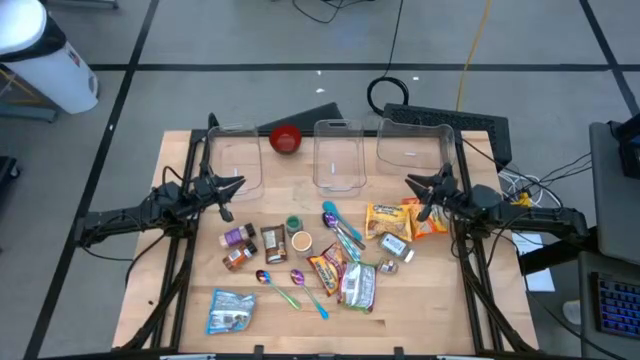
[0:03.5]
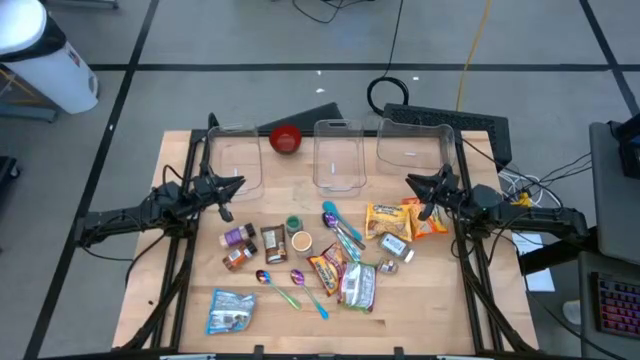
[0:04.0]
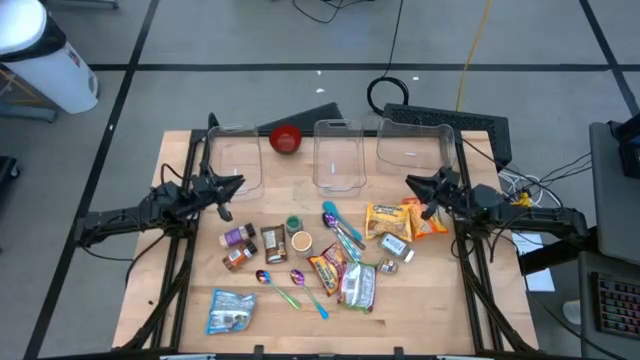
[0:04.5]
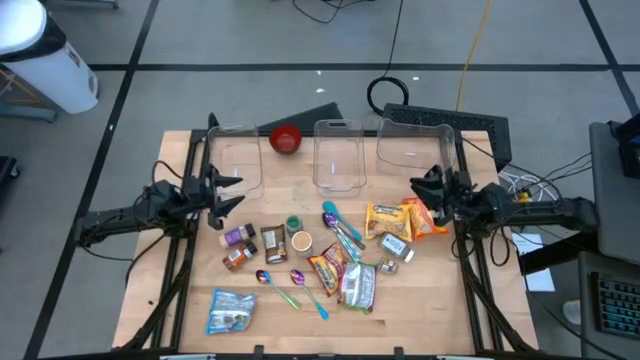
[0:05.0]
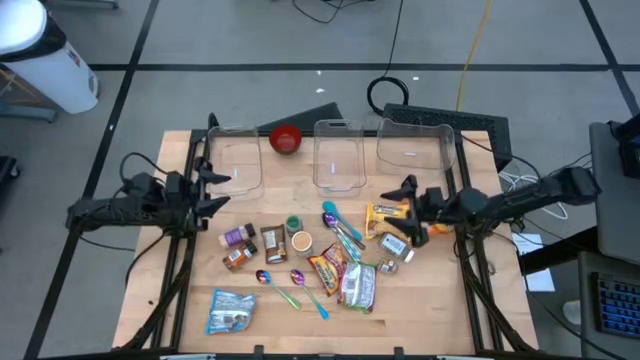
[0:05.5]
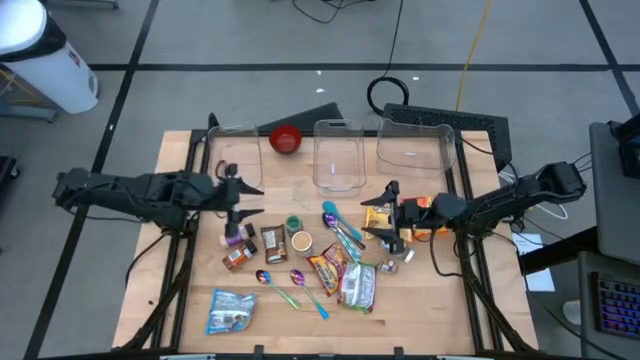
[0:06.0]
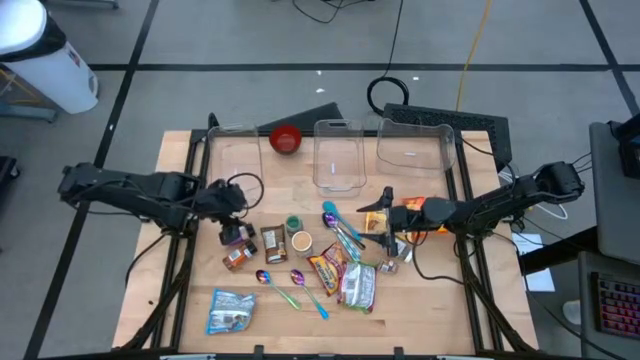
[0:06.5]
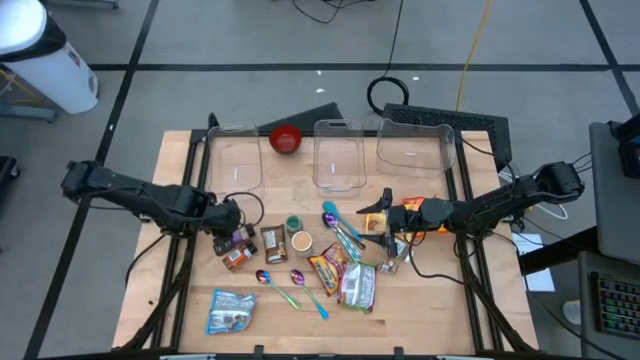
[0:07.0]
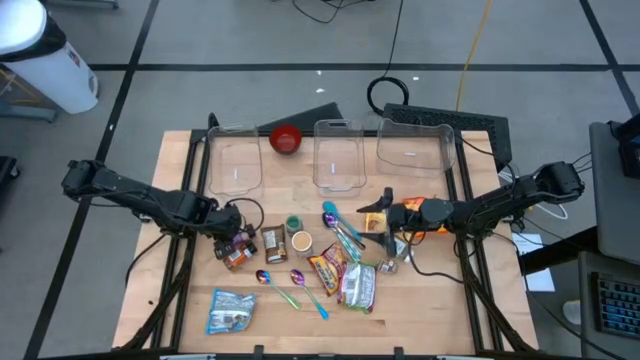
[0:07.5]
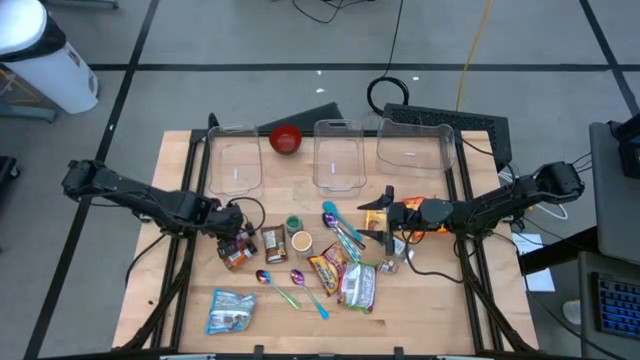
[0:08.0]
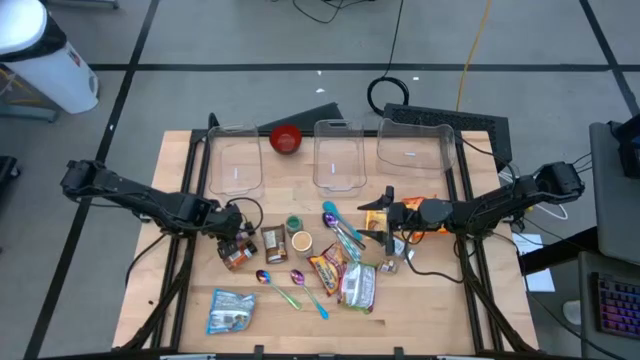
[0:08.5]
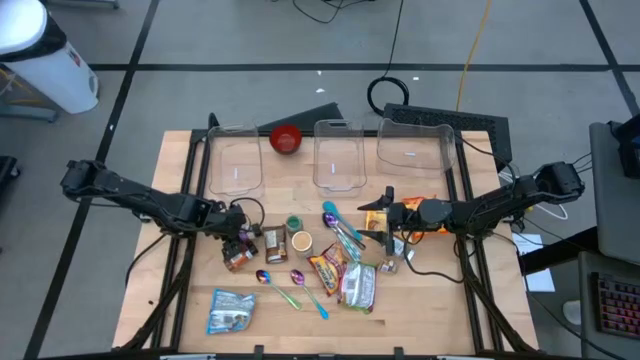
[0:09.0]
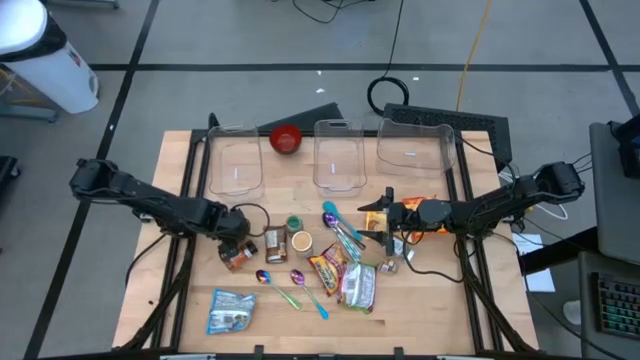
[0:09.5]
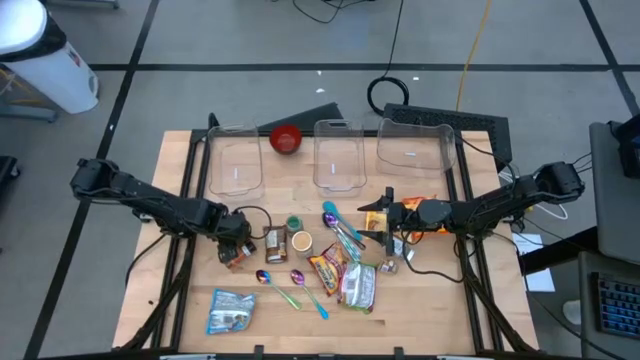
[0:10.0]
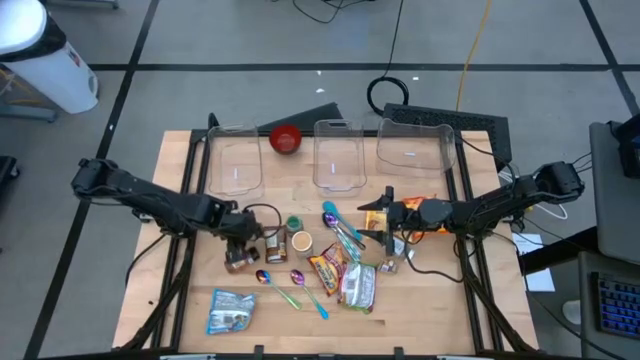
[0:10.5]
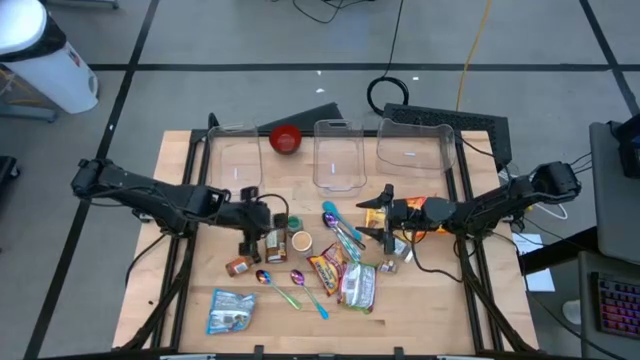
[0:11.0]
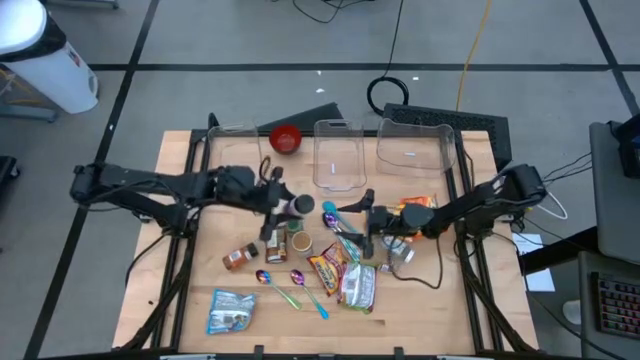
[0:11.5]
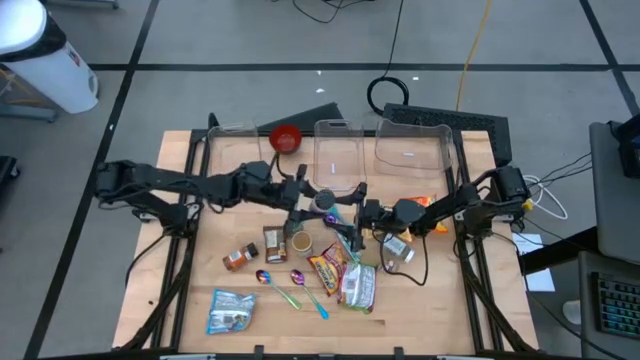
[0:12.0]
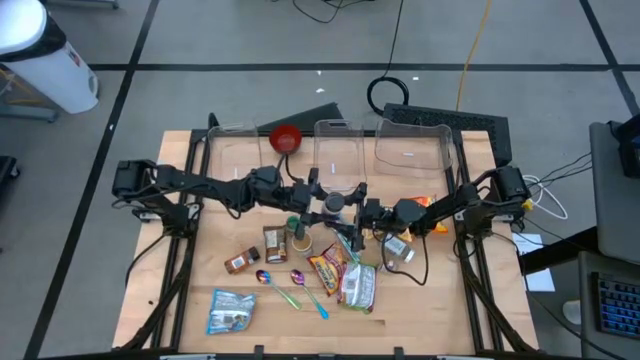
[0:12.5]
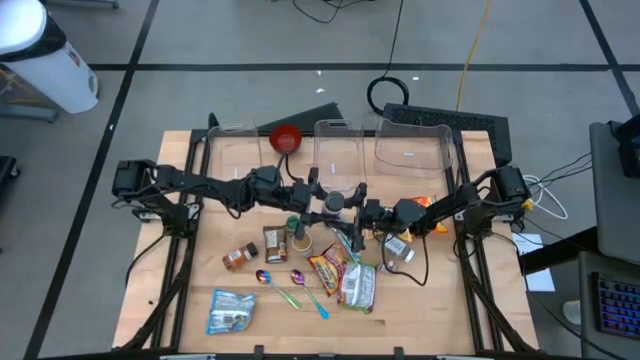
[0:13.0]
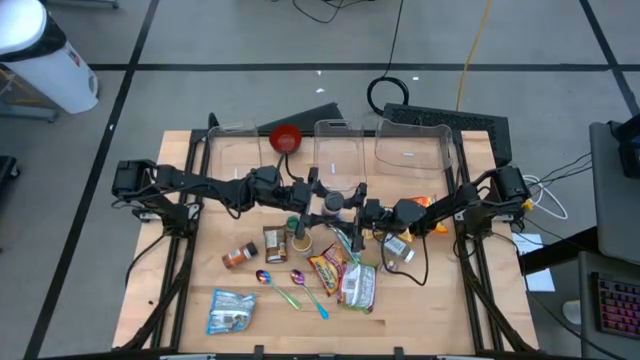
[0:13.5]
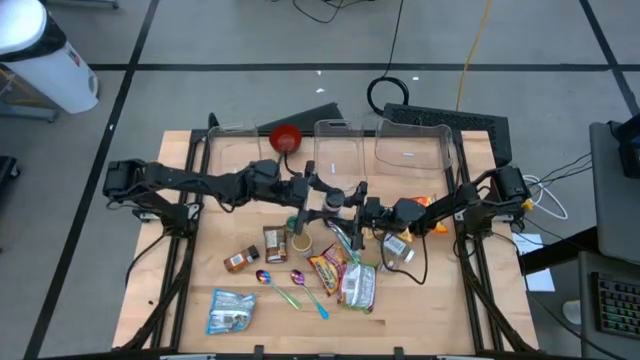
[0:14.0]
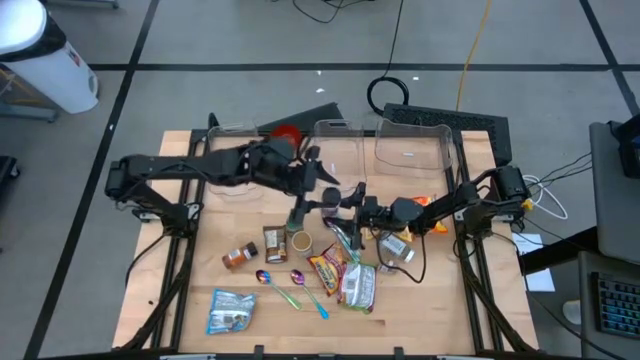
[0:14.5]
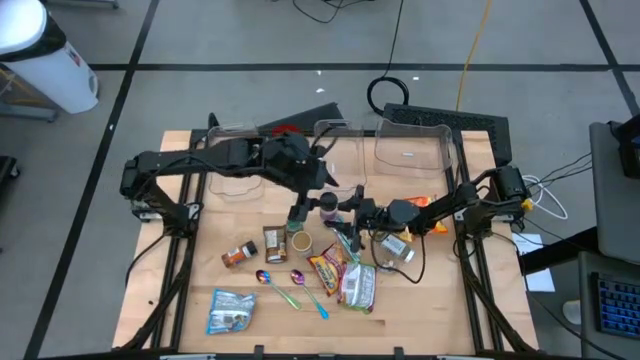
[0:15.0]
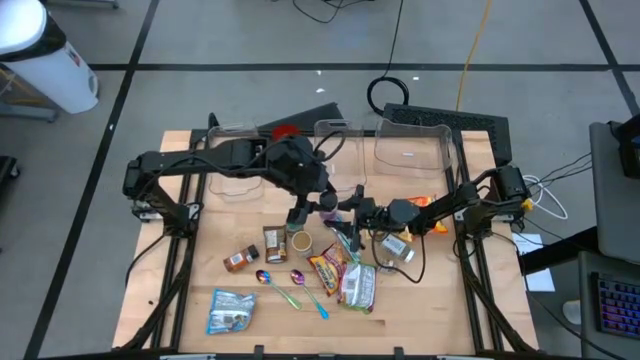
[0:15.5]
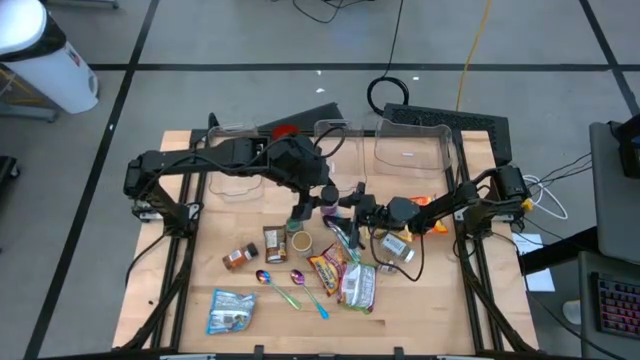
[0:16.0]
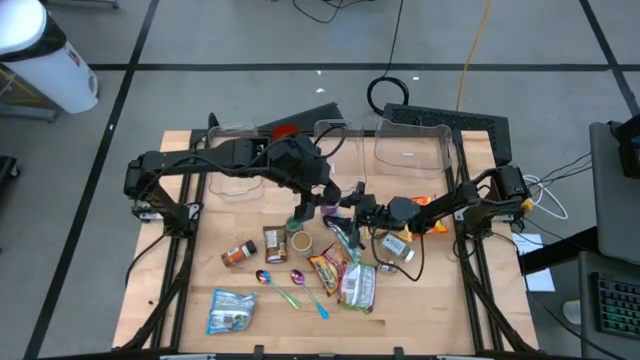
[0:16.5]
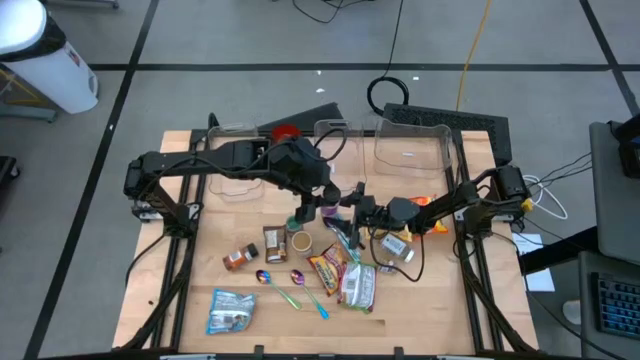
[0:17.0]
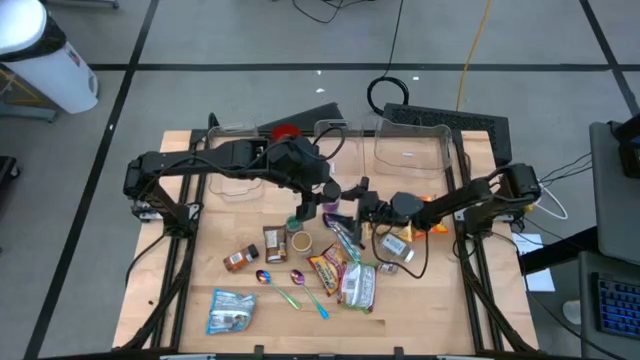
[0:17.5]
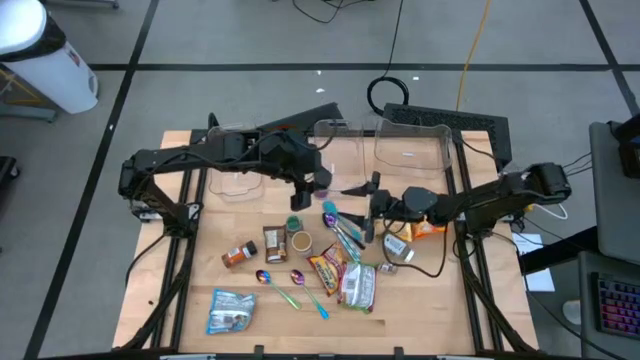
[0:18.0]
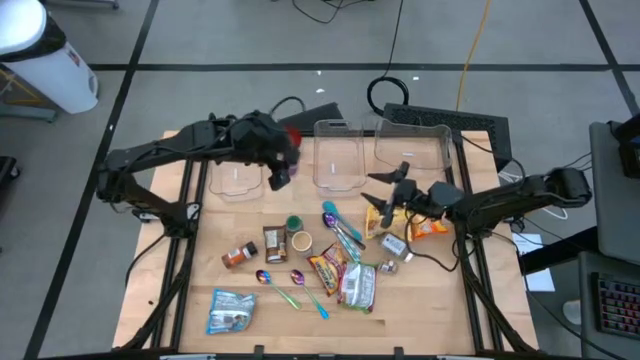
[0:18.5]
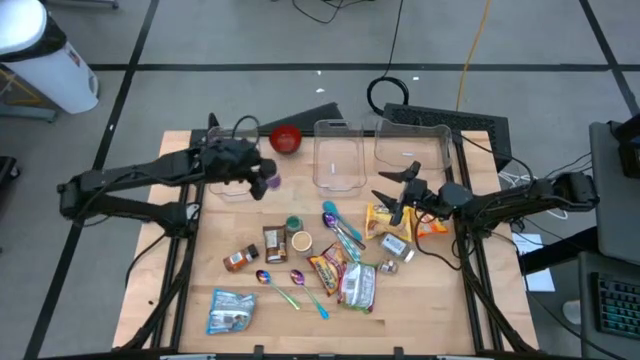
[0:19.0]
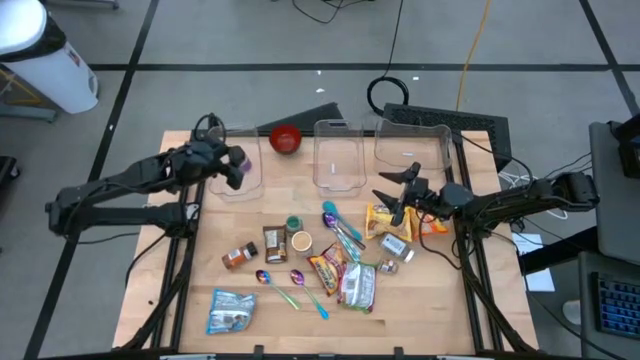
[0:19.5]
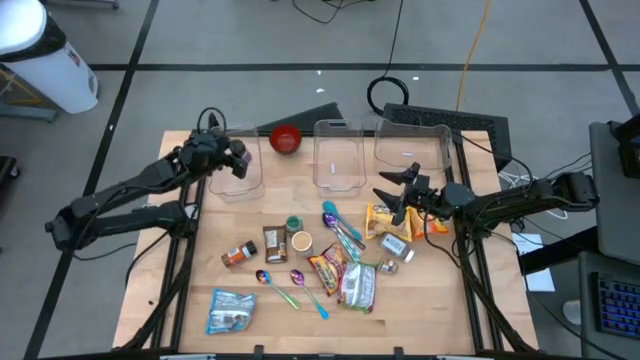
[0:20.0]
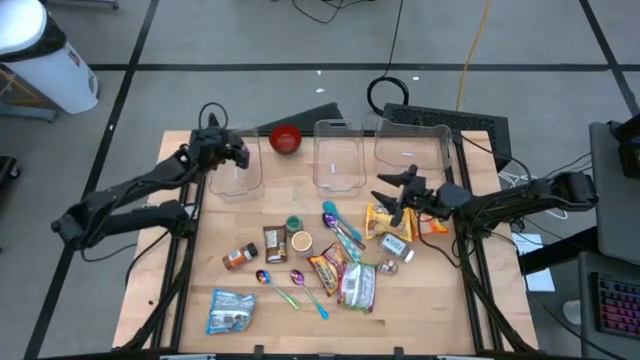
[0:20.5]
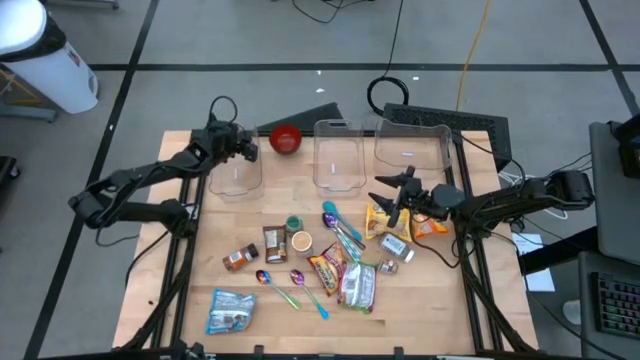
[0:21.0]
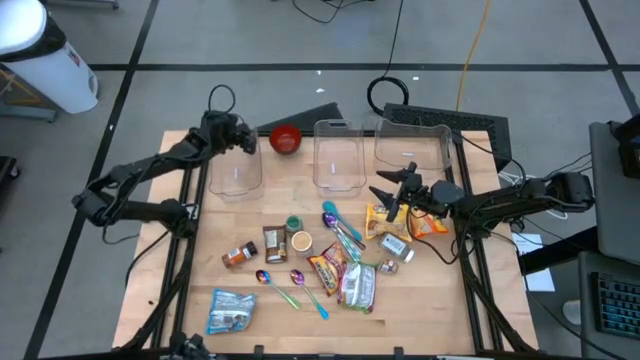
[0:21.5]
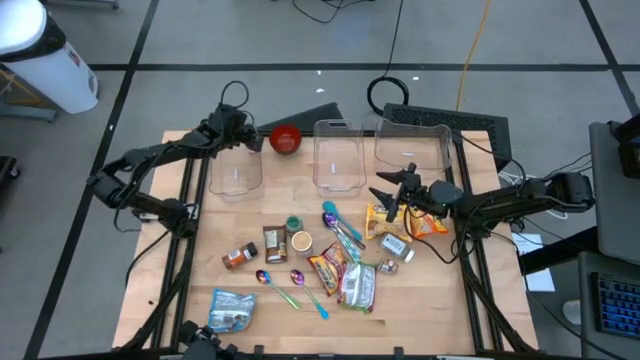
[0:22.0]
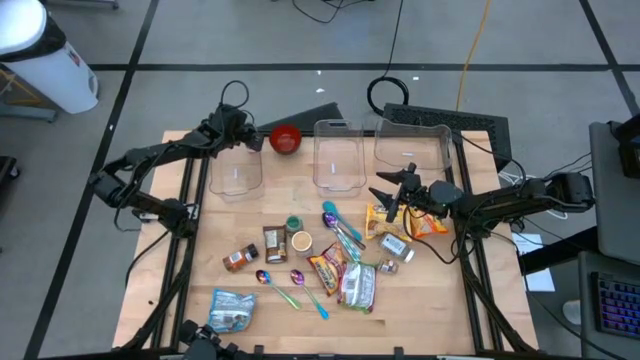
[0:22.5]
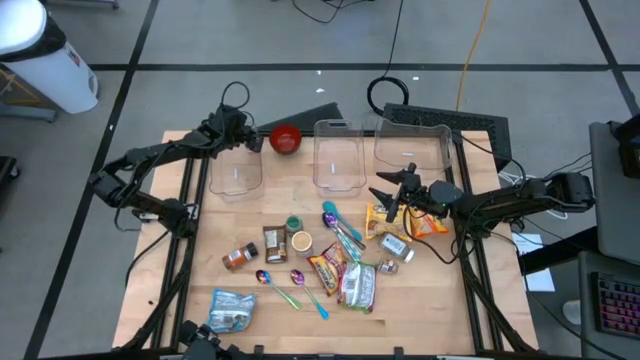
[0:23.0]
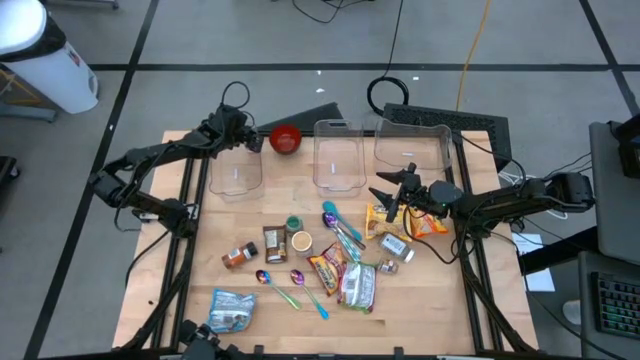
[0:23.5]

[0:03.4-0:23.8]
Task: Pick & Place Food Item
Put the violet seasoning bottle into the left transparent bin
